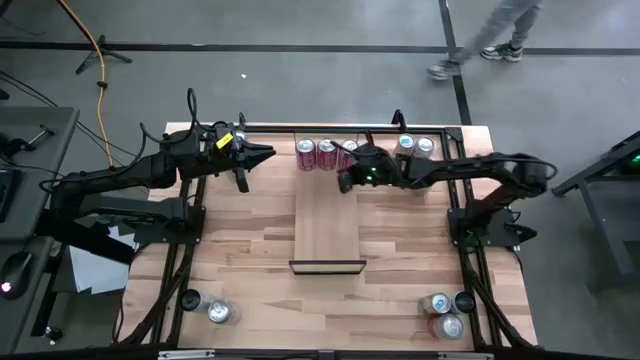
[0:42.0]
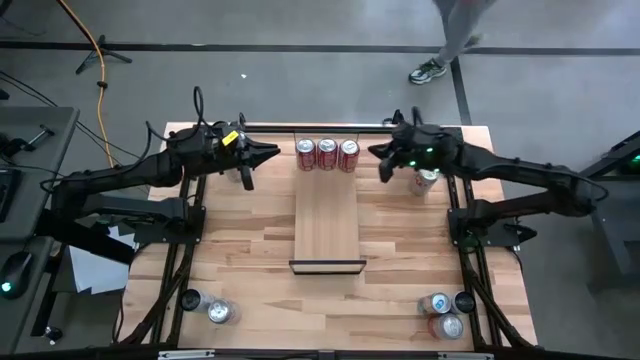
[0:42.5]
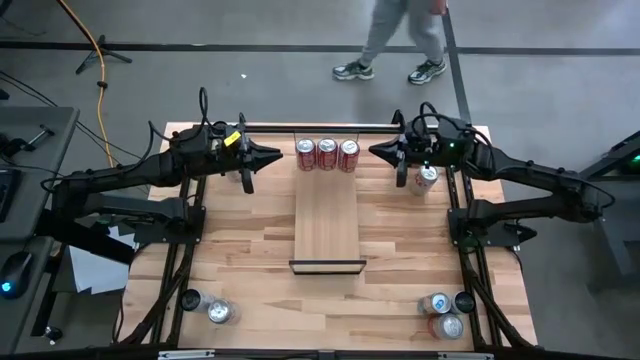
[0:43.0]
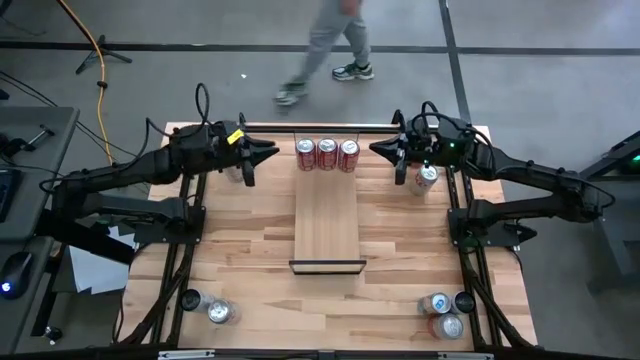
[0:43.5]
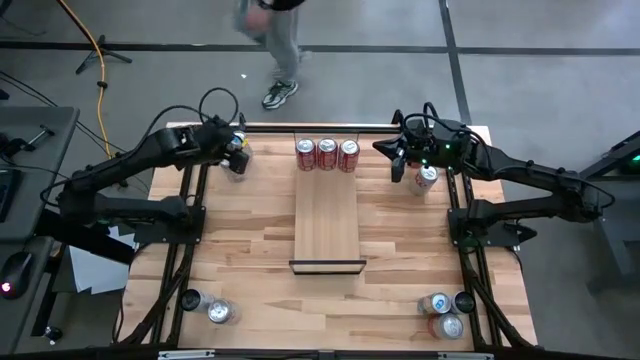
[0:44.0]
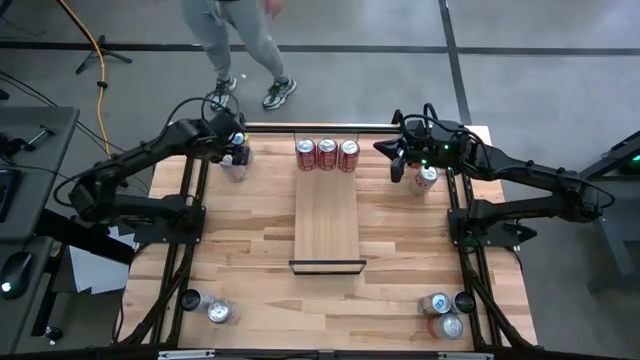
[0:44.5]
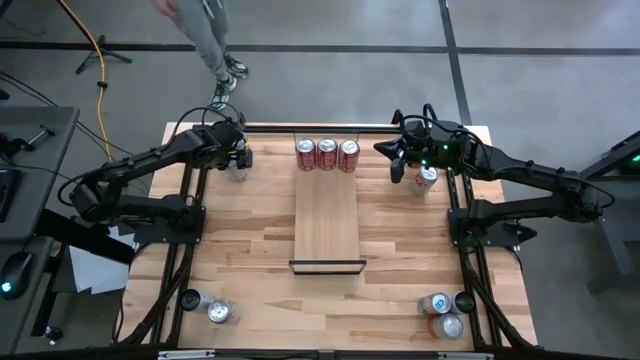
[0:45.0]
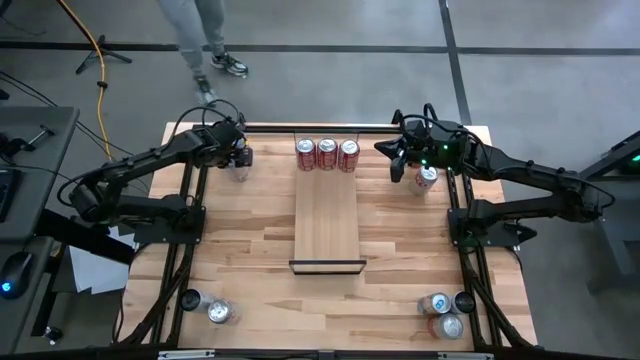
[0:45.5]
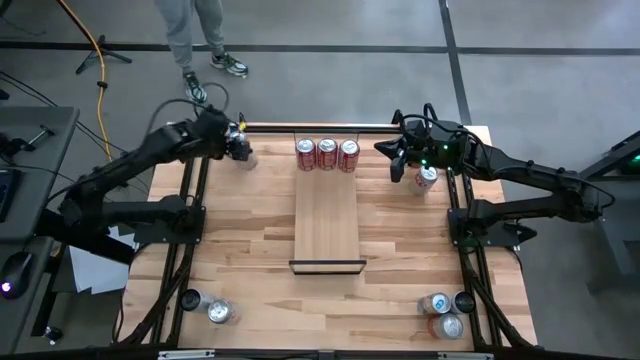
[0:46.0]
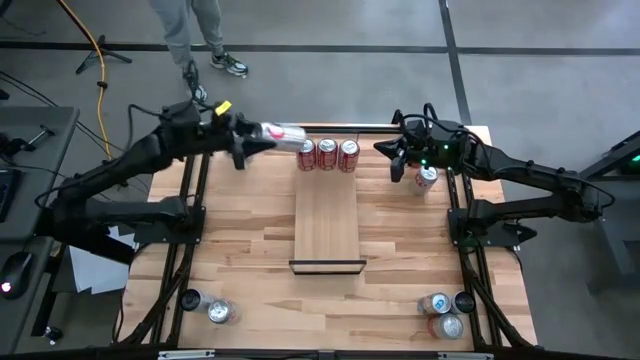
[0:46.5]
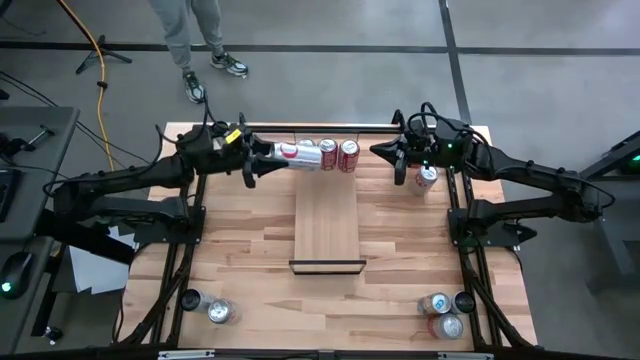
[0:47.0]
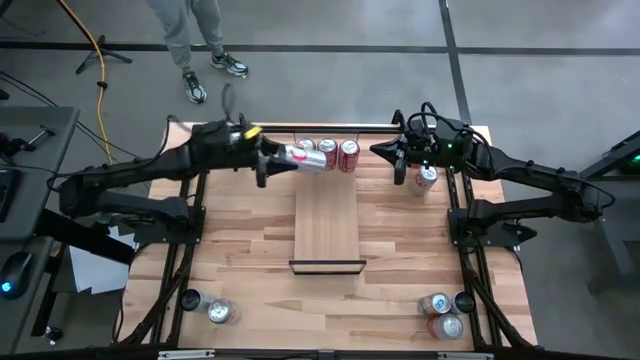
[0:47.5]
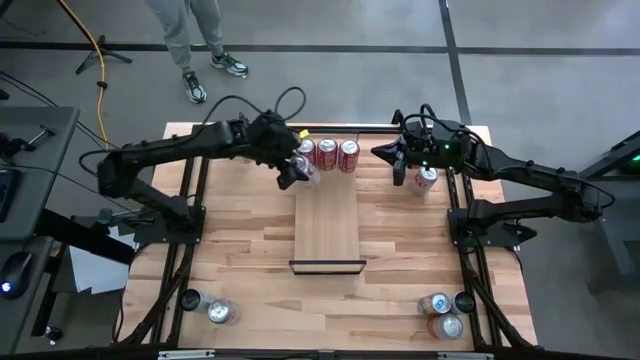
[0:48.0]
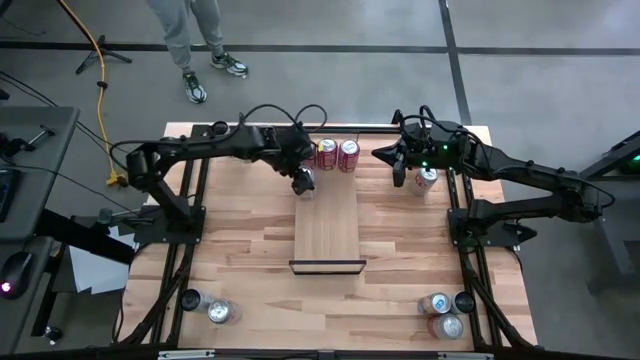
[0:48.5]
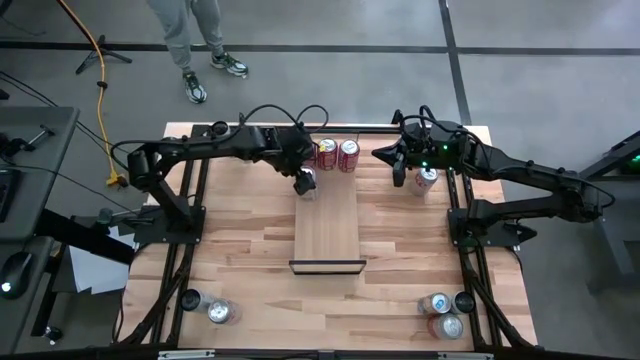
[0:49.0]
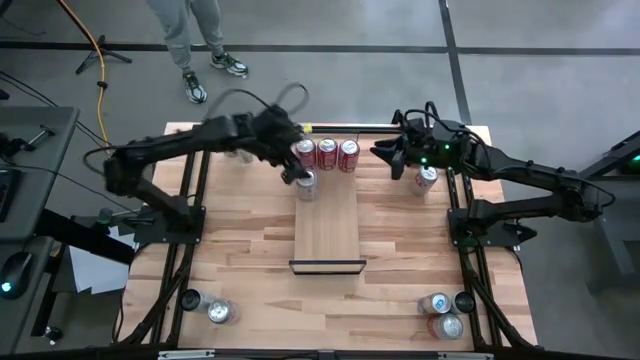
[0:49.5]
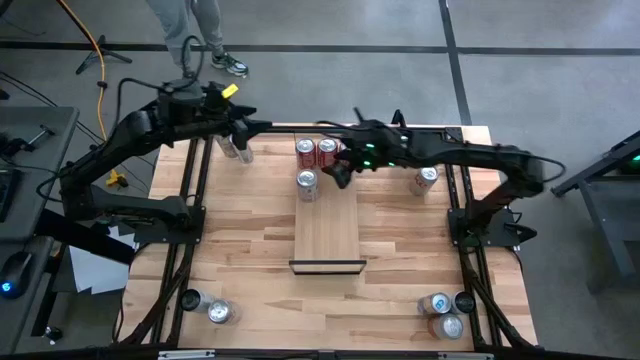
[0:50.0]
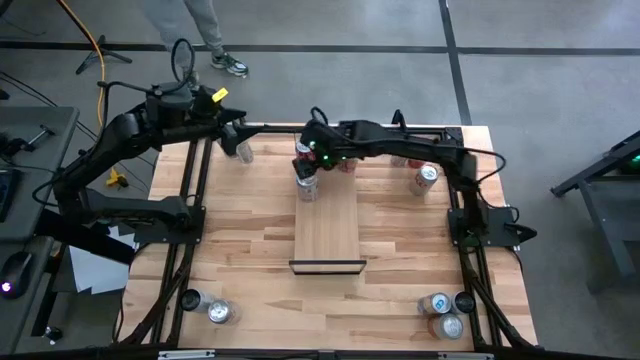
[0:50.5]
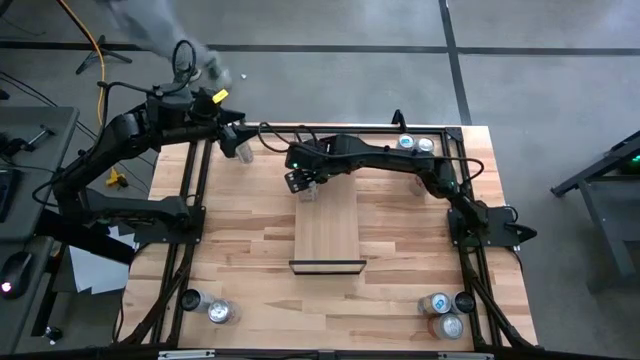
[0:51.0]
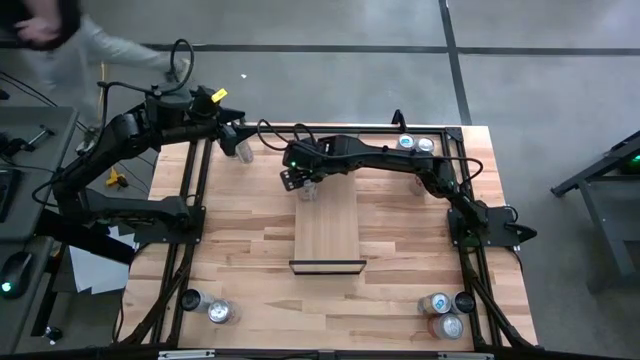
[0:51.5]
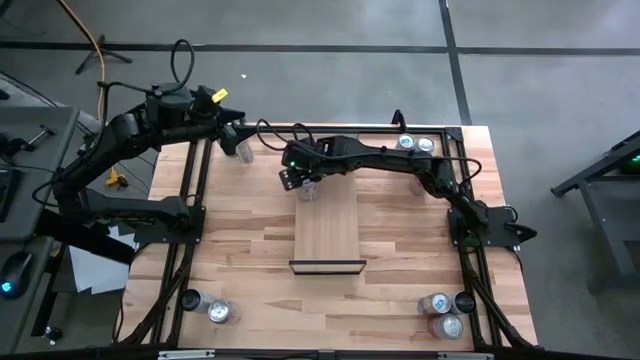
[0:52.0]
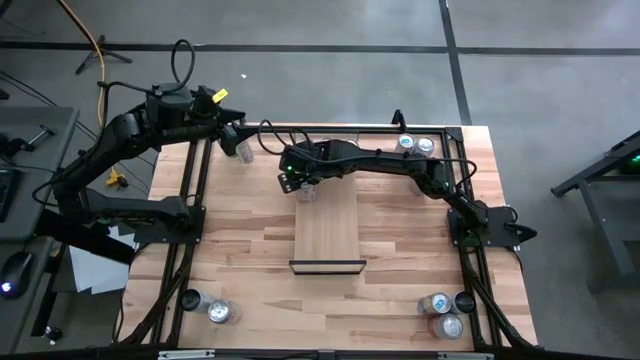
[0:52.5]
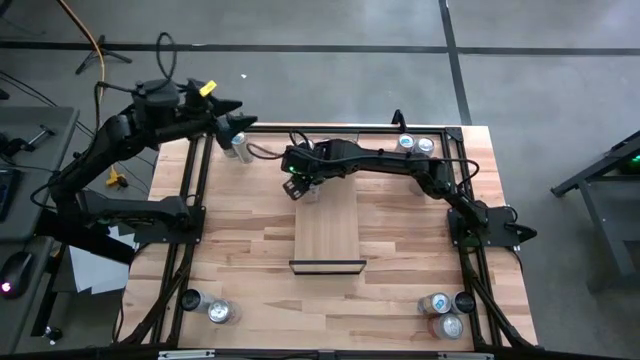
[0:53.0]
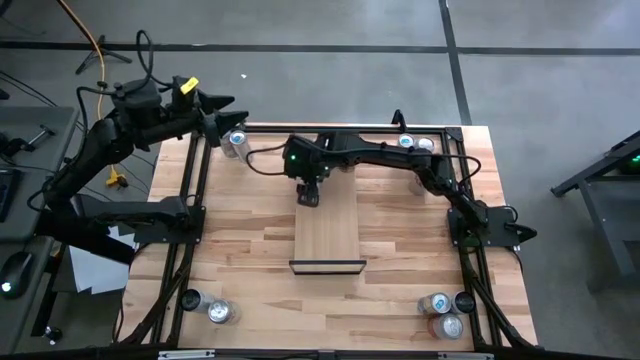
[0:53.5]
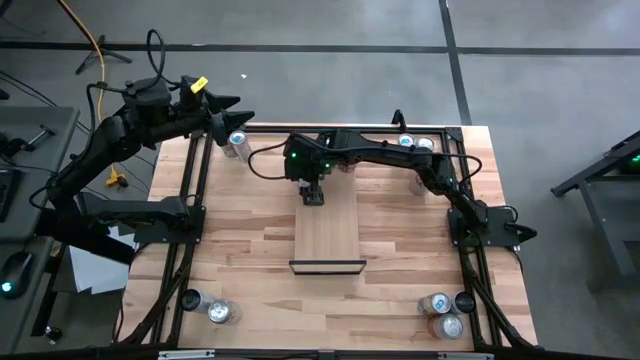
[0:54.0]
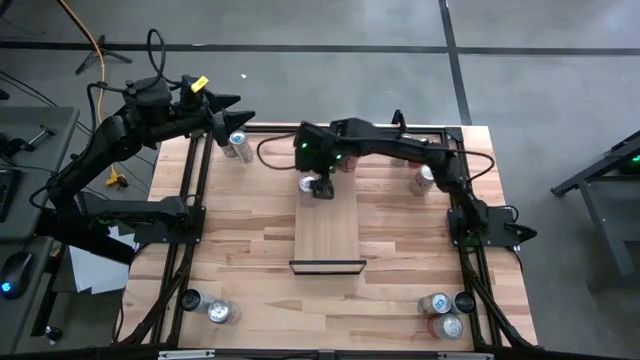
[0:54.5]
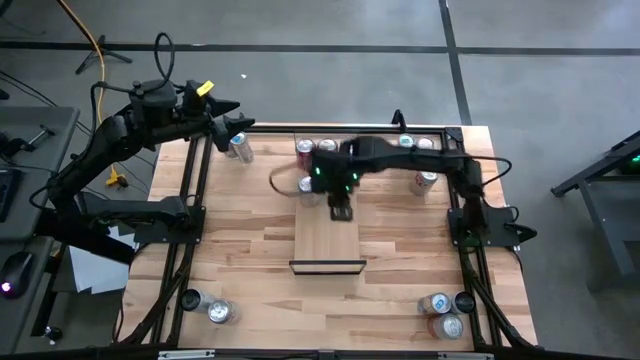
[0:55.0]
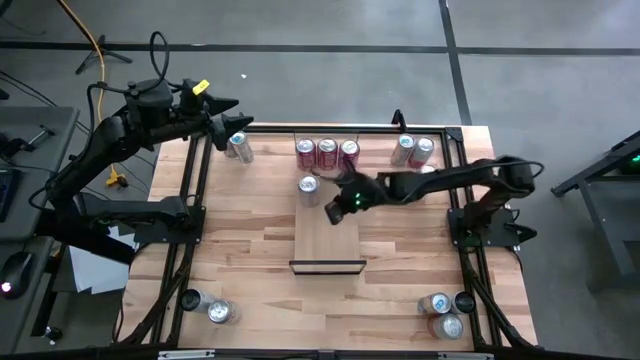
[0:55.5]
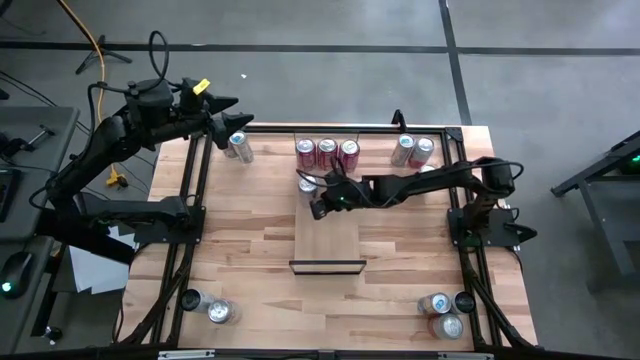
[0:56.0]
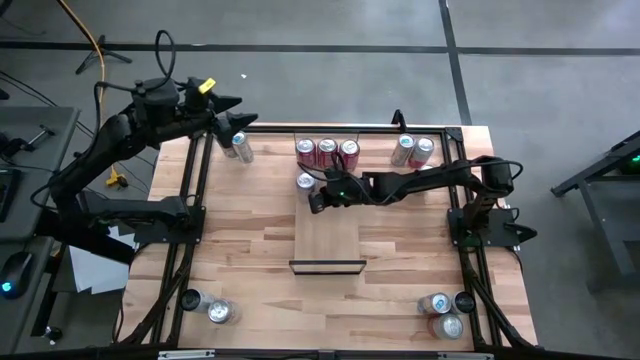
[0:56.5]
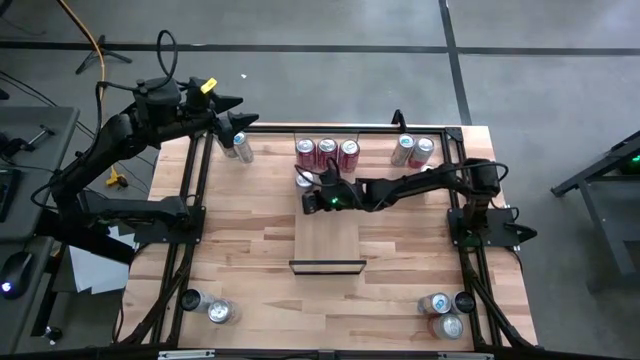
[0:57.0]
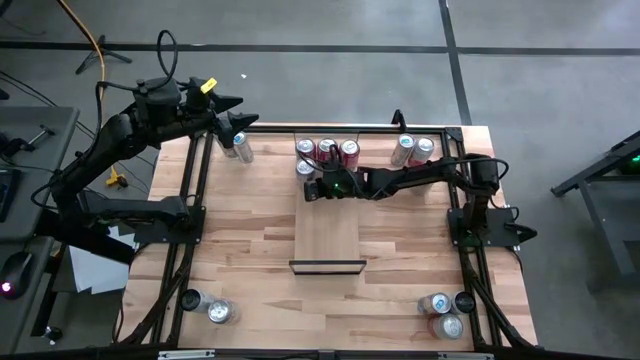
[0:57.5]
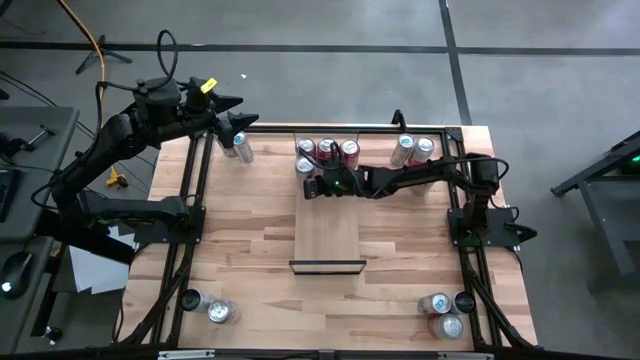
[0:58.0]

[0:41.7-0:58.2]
Task: Place canned beverage on shelf
Put the top left red silver soda can on the shelf

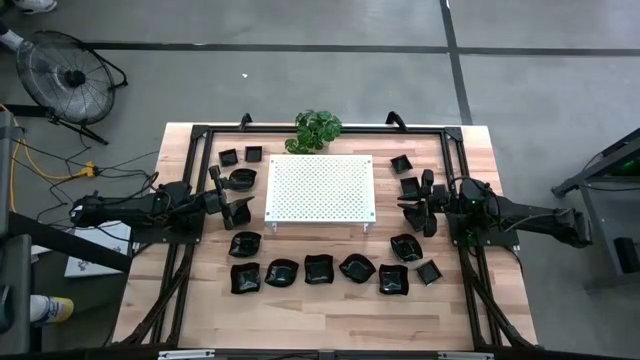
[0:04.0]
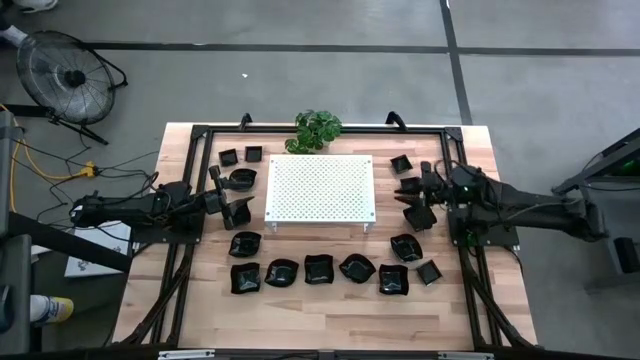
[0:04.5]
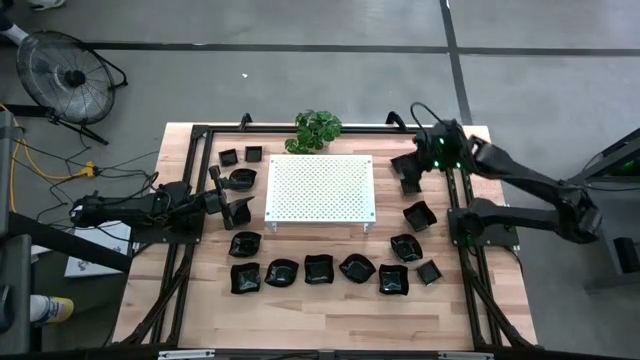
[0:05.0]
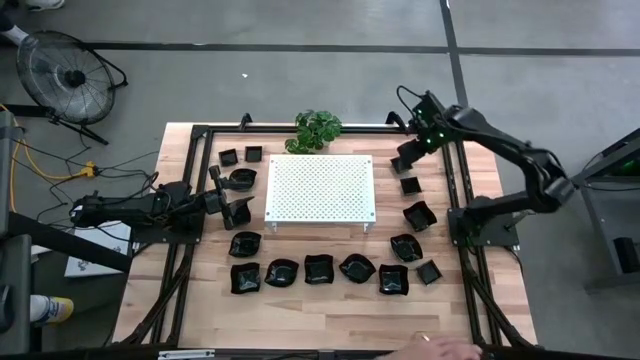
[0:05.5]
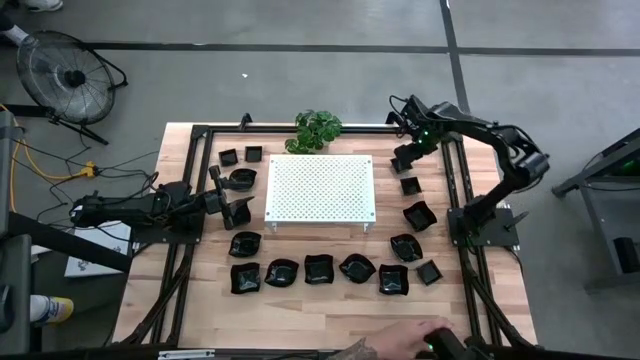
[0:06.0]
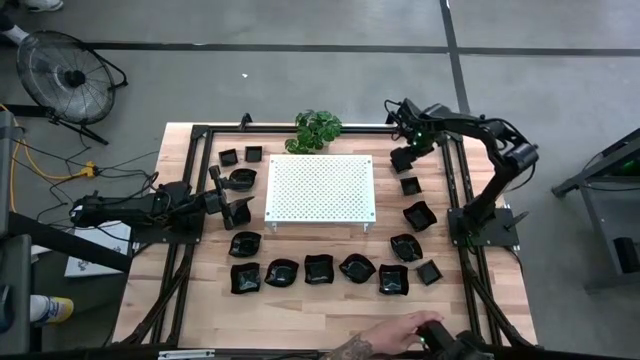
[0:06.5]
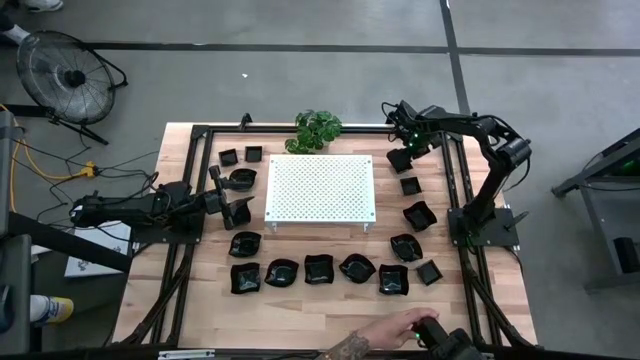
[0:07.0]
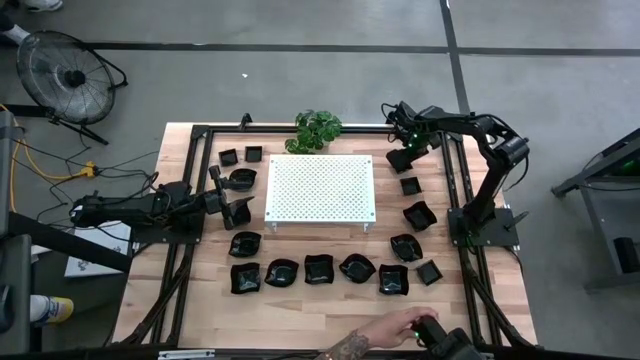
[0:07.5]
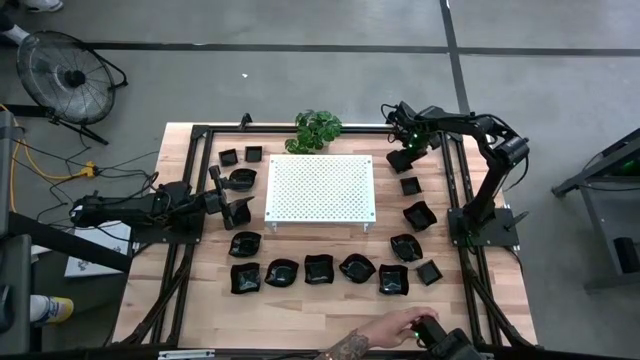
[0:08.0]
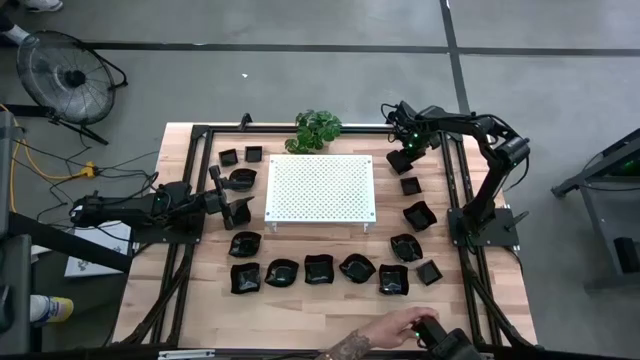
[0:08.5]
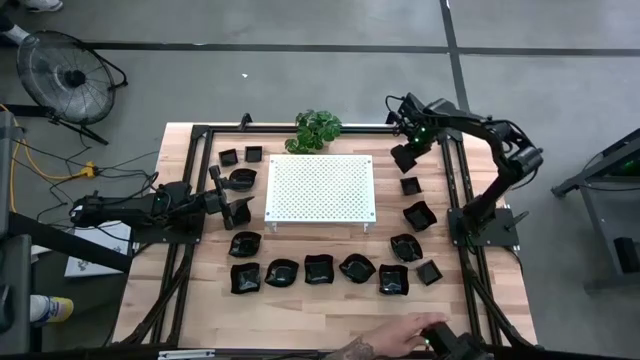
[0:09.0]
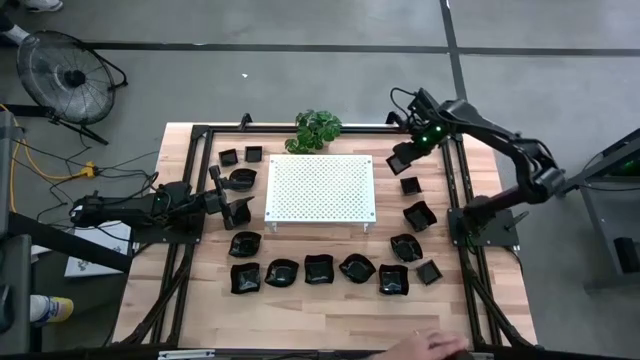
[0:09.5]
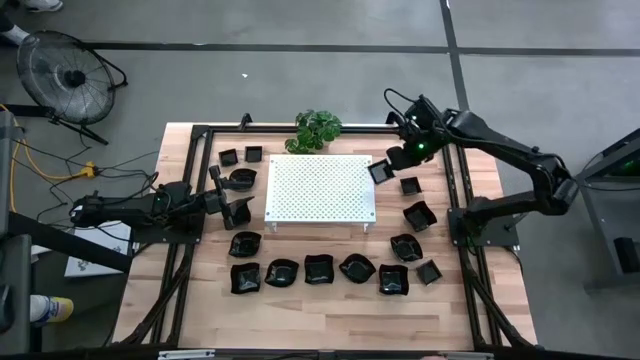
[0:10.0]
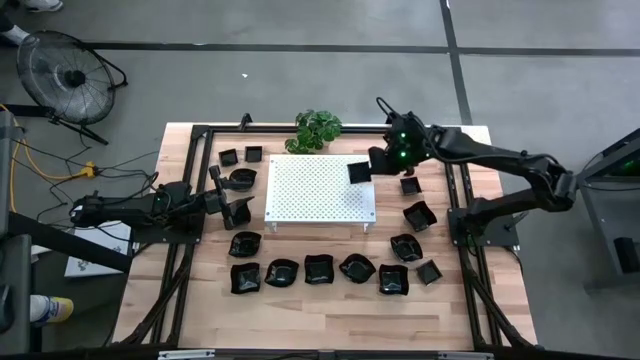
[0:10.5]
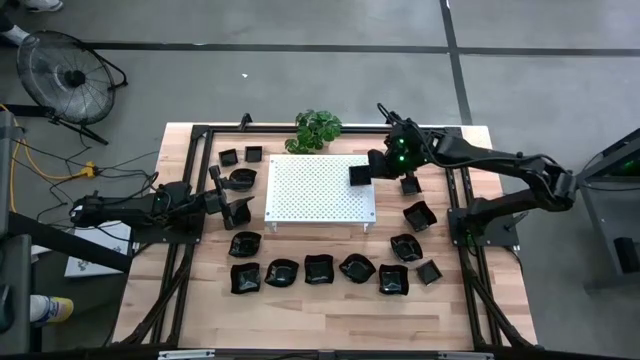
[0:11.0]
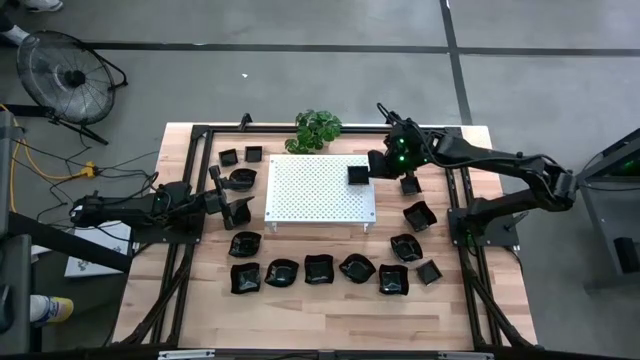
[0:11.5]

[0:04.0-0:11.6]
Task: Pick & Place Mini shaped plates
Put the square plate on the shelf
